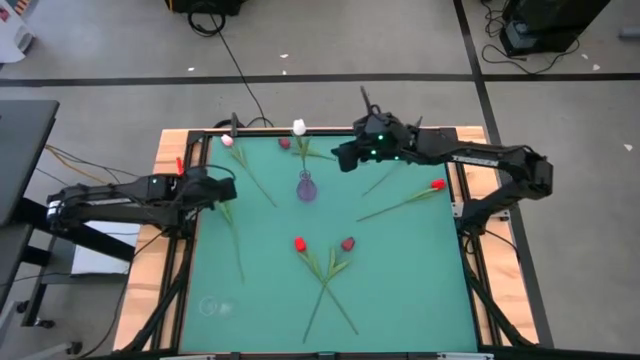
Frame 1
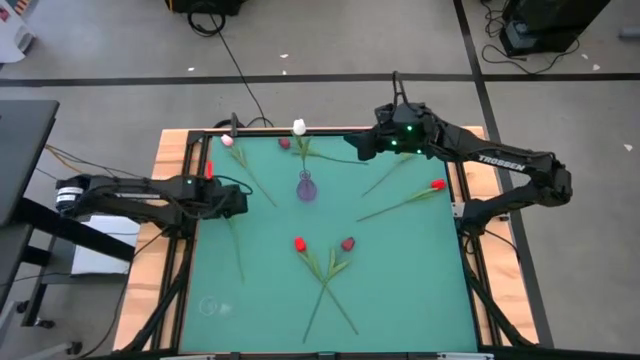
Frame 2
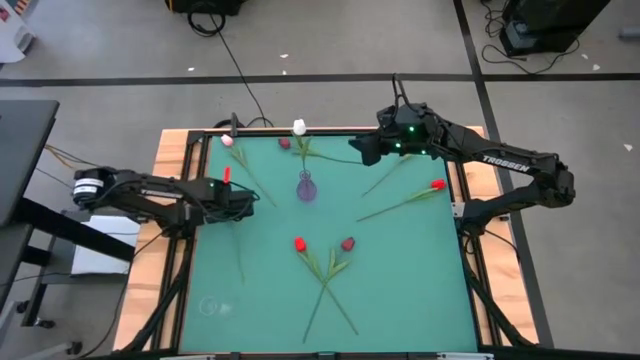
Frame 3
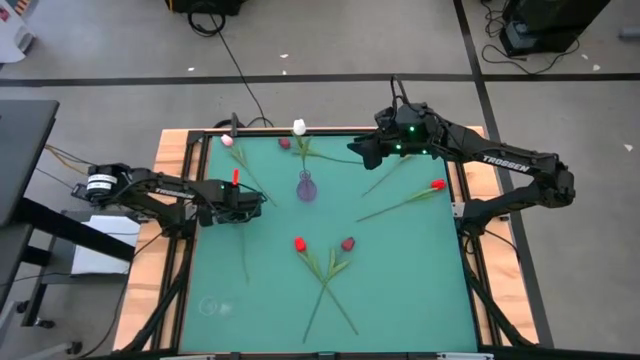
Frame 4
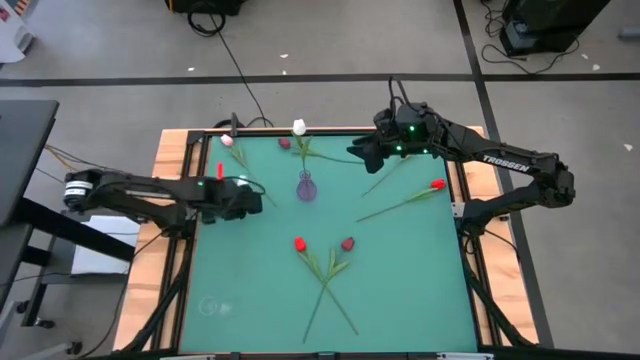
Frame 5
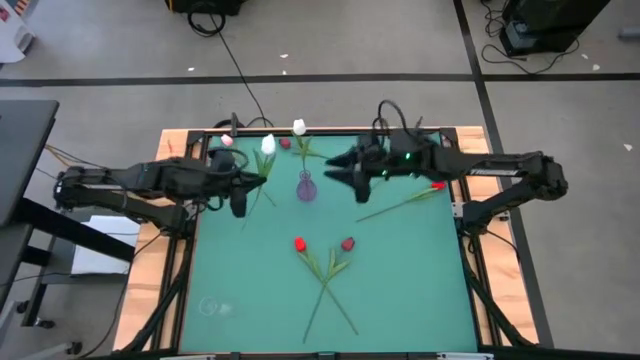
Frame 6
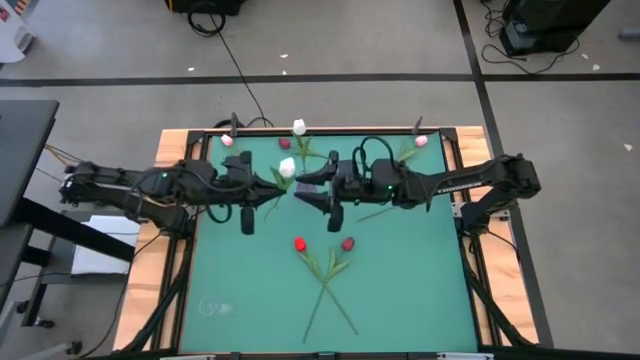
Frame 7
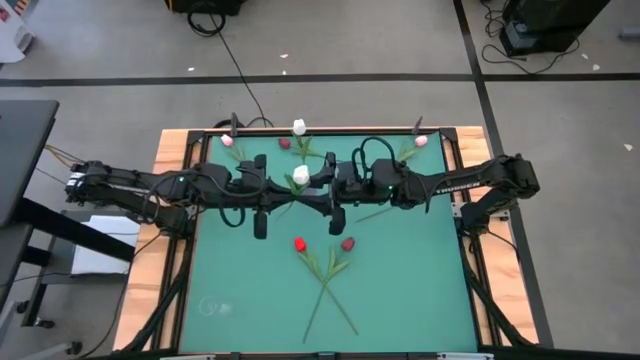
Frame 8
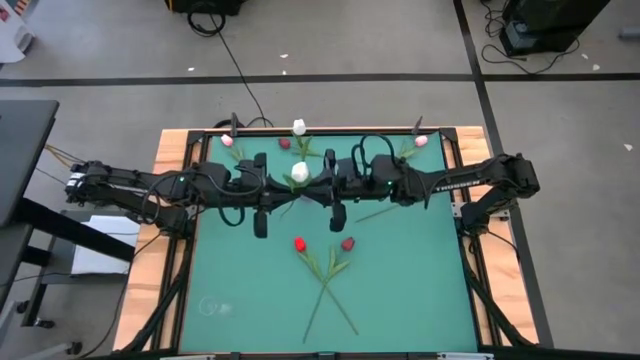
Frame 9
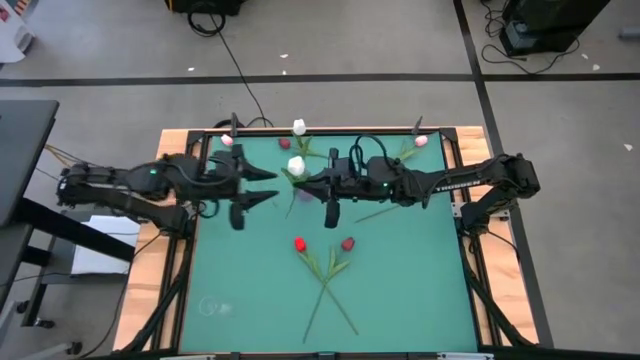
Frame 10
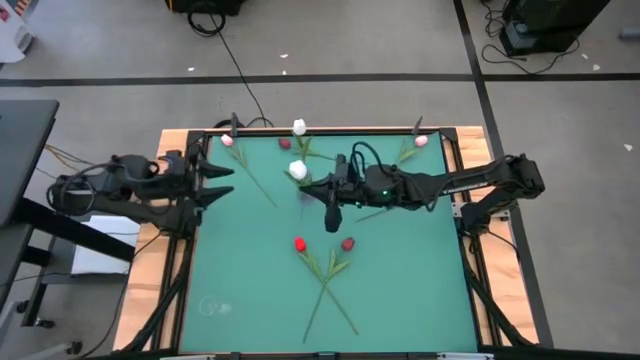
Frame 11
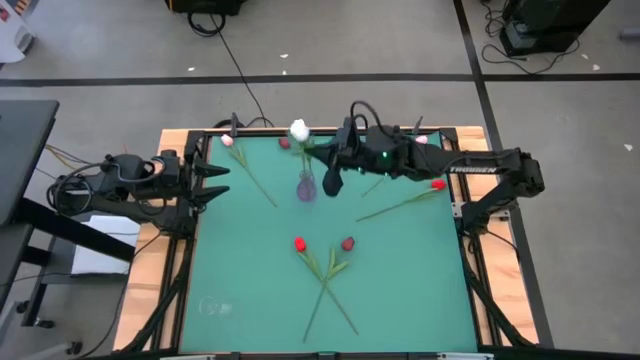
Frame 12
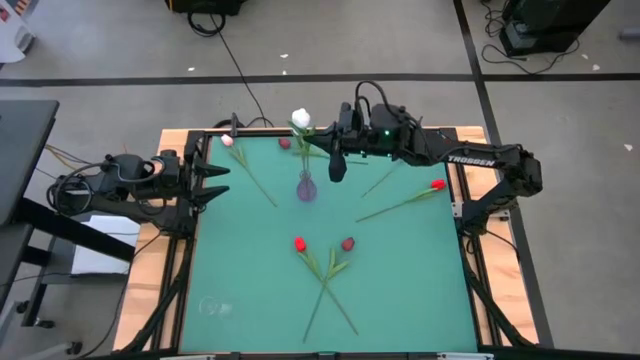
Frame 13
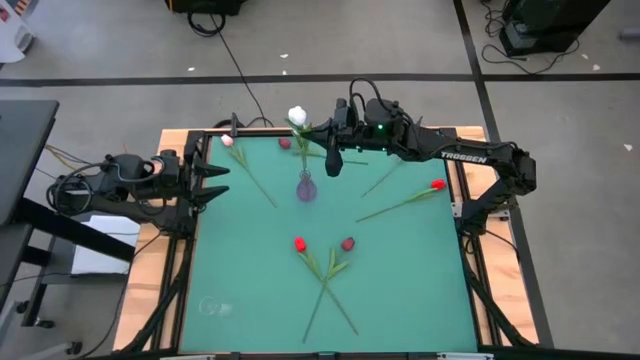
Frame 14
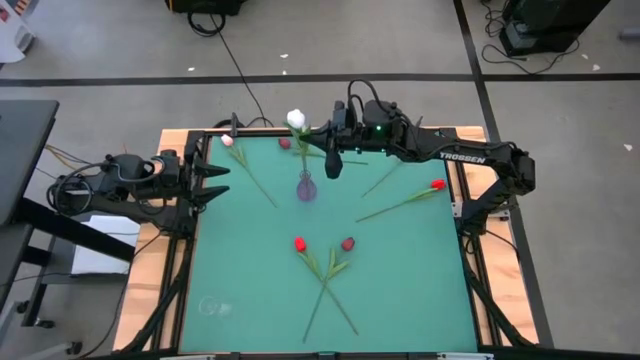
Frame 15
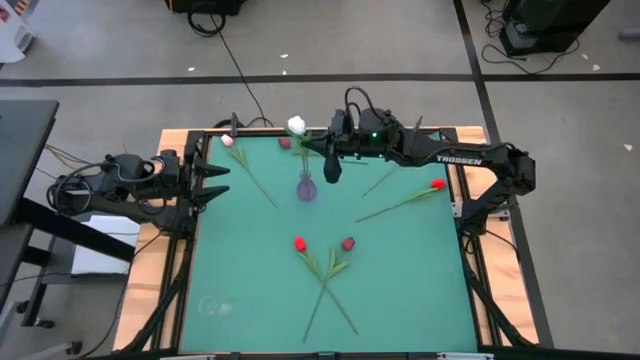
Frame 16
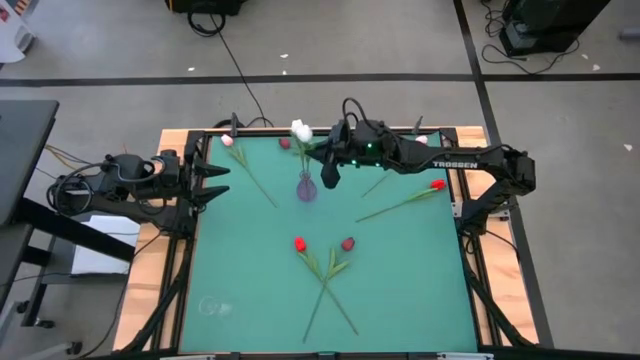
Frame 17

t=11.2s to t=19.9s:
Task: Sort flowers into vase by color
Put the white tulip into the purple vase

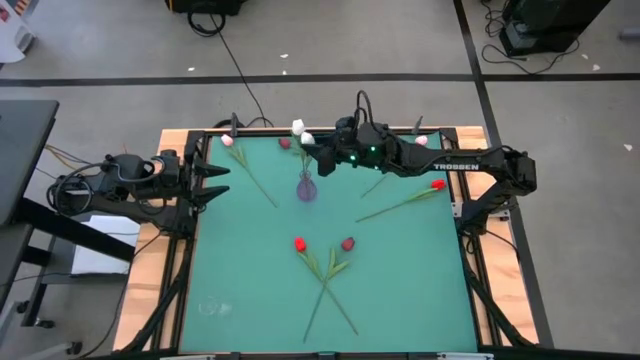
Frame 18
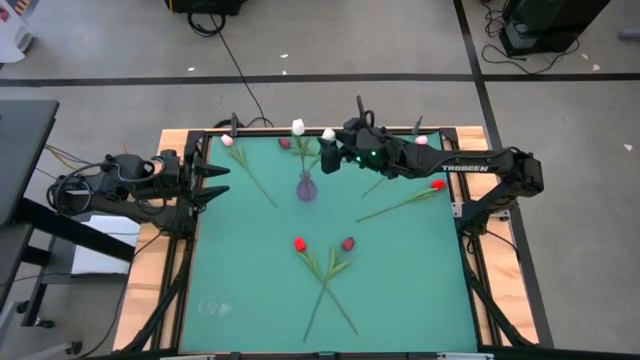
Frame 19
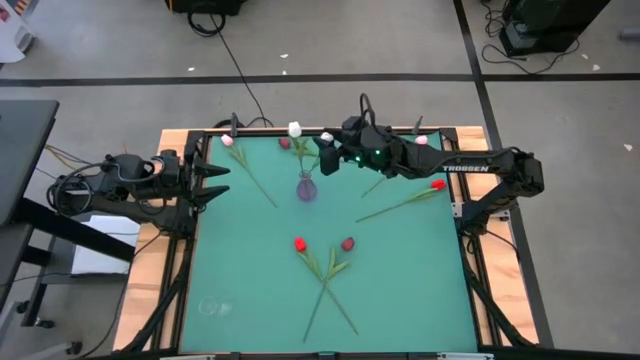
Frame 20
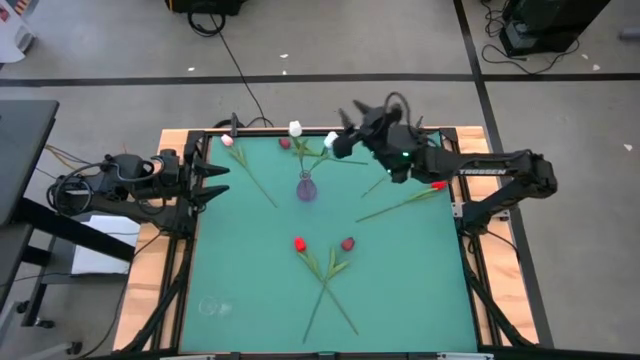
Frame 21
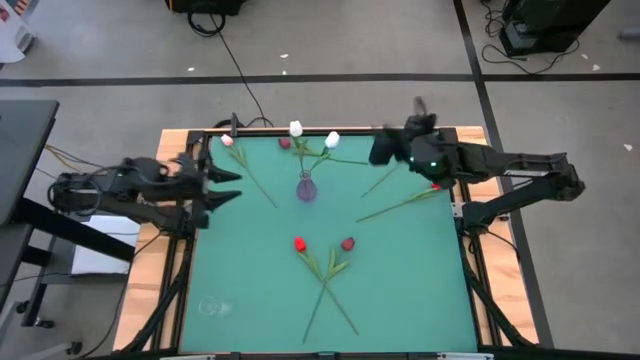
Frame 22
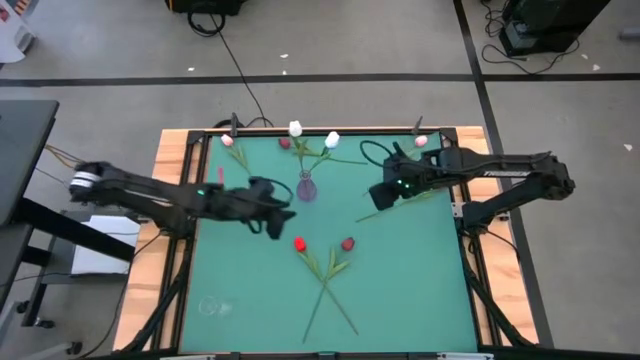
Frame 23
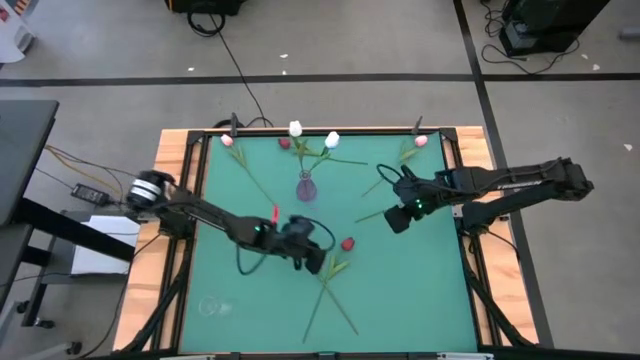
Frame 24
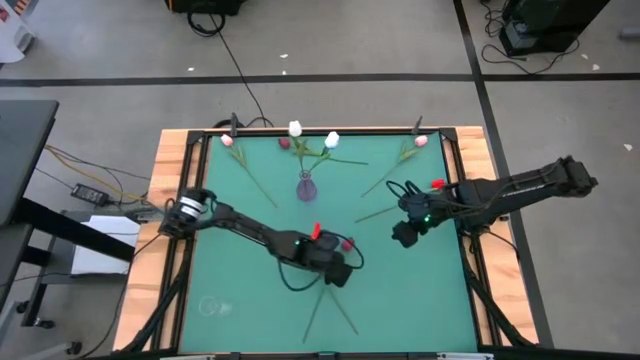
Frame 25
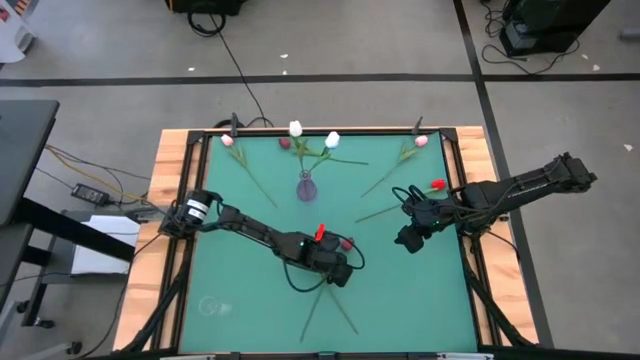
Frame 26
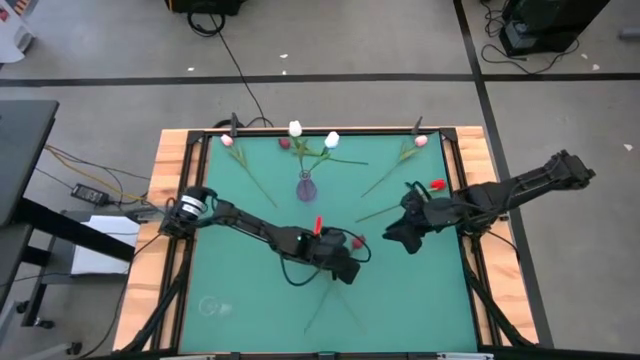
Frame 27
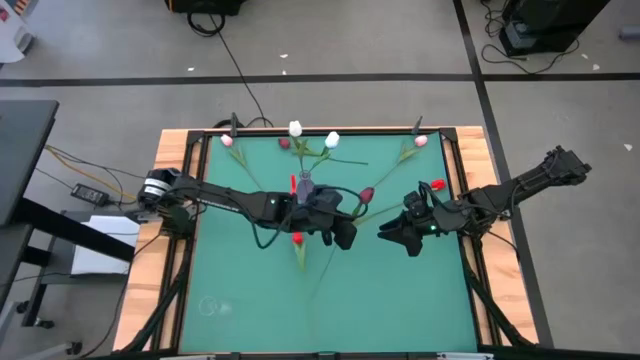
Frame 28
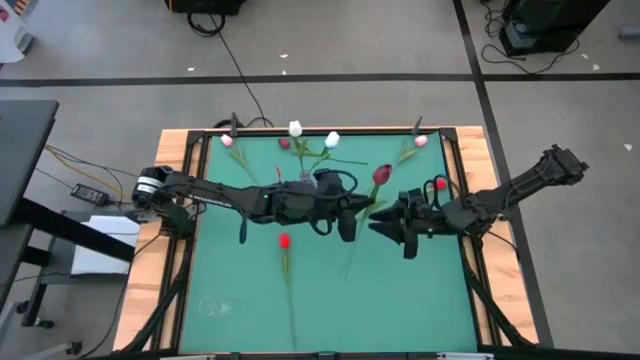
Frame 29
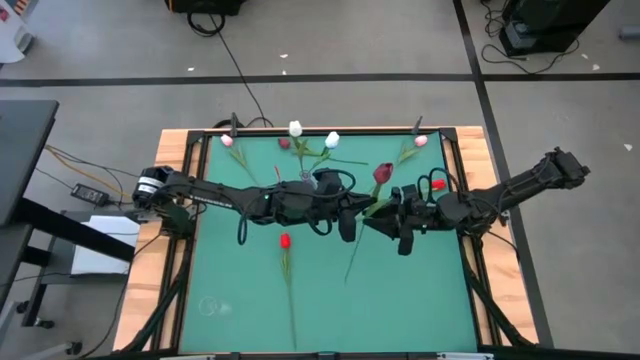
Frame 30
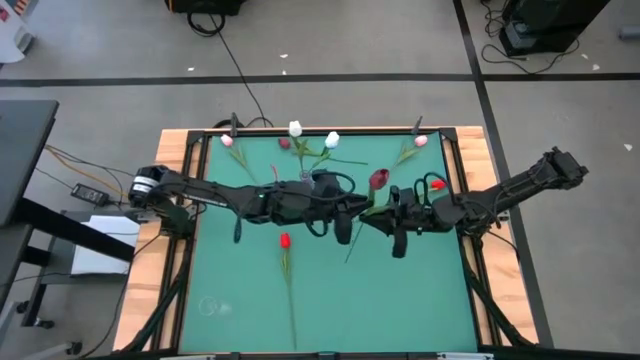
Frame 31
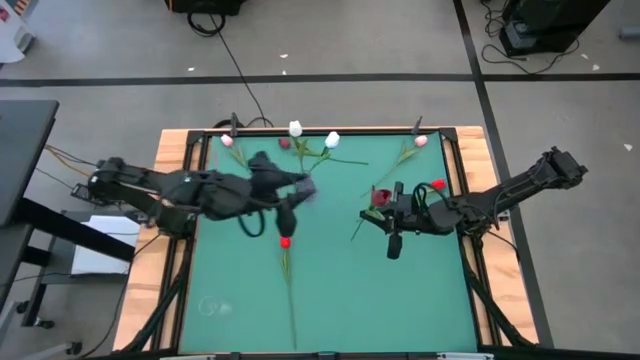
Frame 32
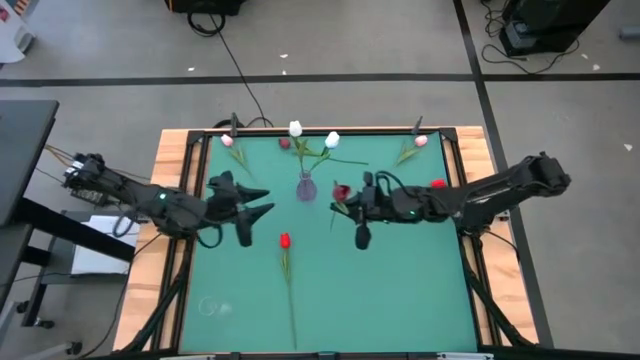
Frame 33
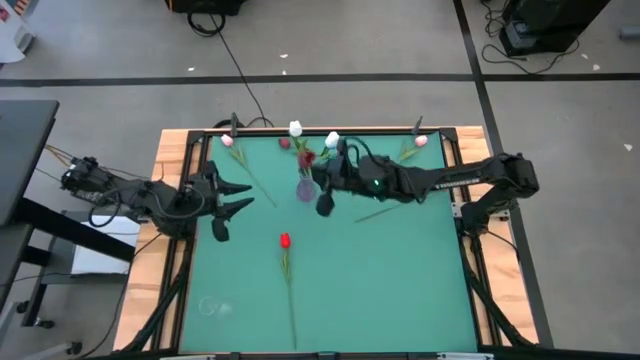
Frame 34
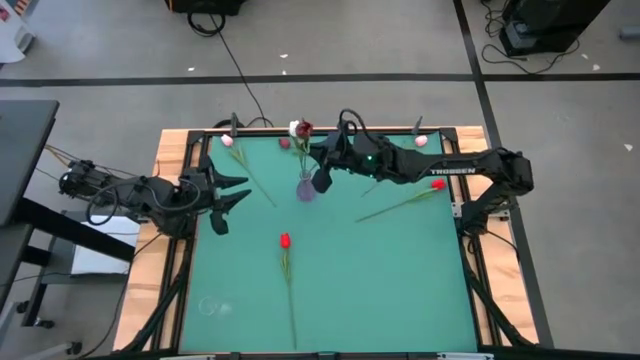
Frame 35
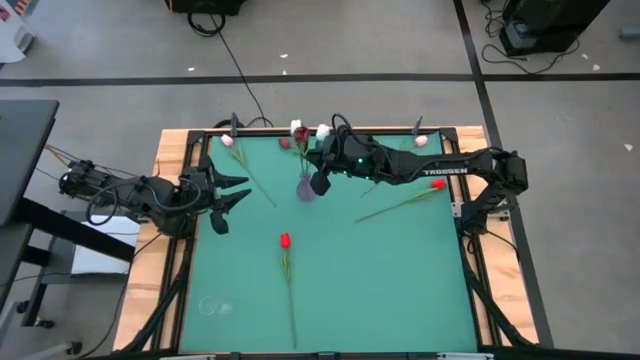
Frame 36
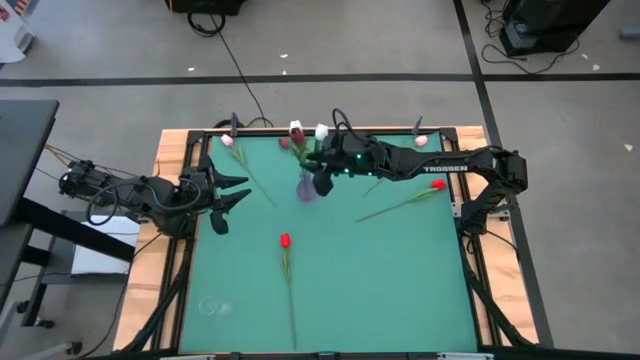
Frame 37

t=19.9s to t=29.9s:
Put the bottom dark red tulip into the purple vase

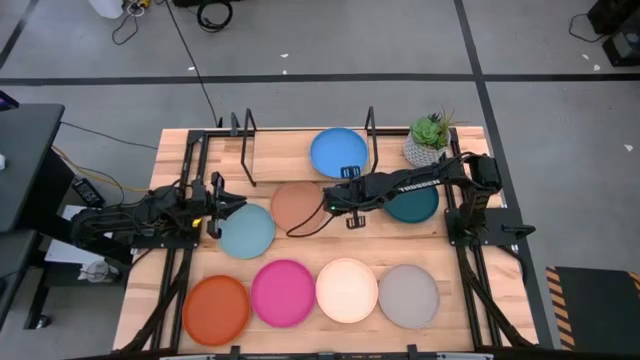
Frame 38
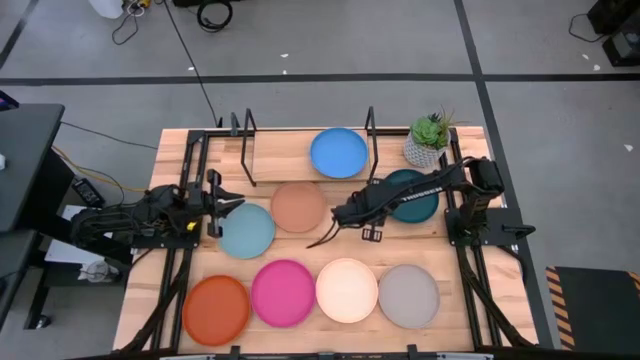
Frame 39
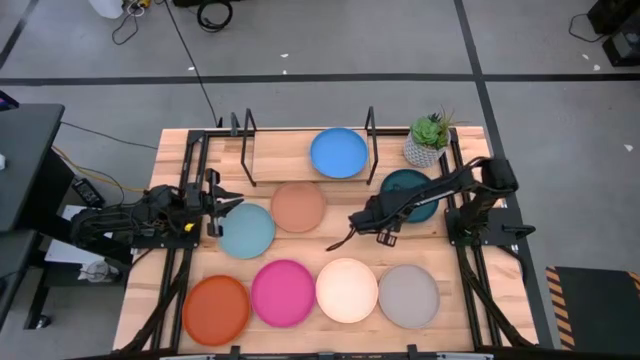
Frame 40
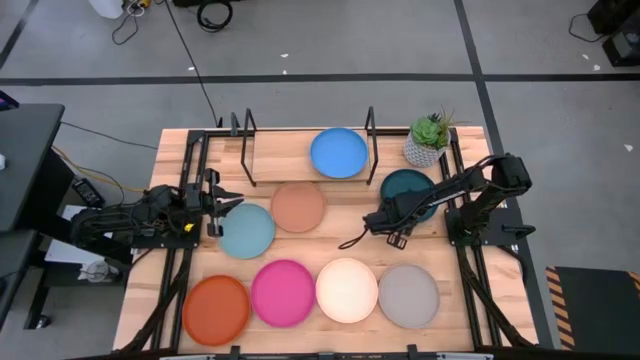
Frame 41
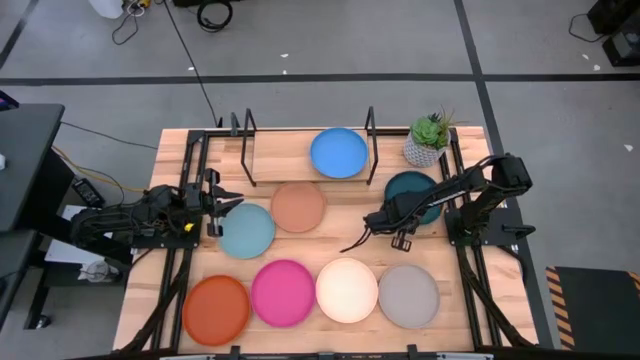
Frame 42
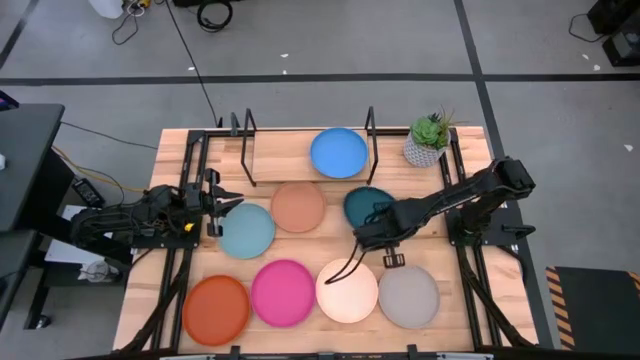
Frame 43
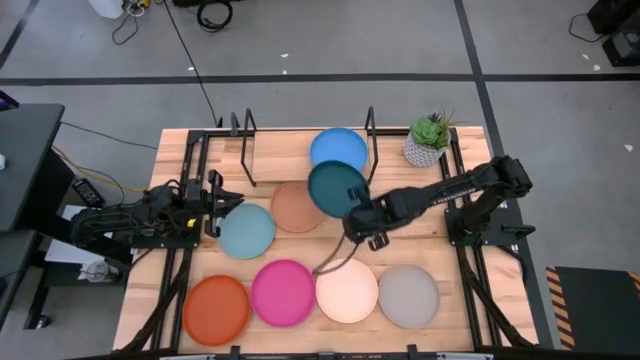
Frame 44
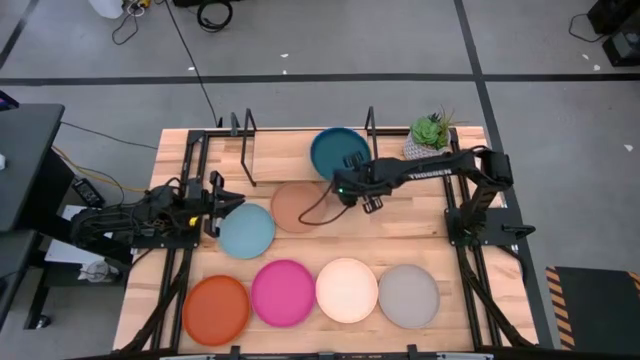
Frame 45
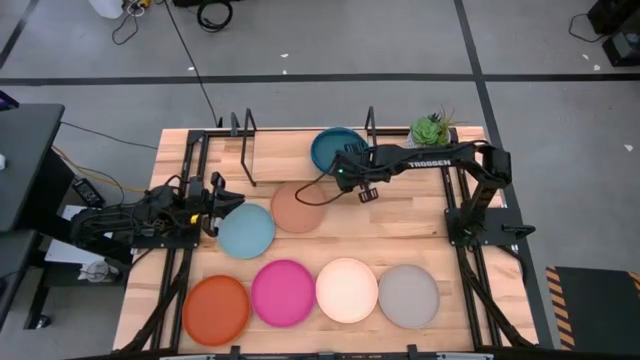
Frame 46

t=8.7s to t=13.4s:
Task: Place and stack plates onto a shelf
Stack the green plate onto the blue plate
